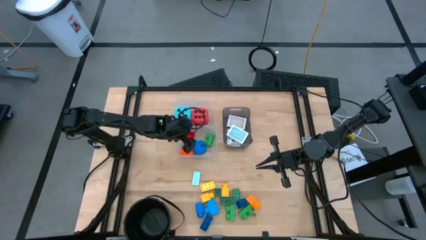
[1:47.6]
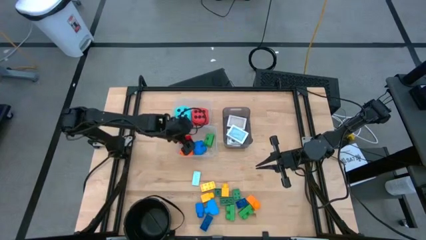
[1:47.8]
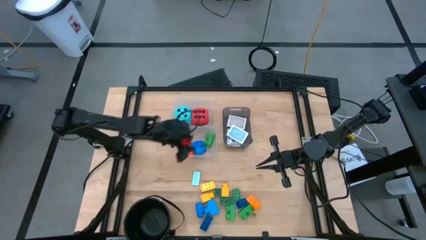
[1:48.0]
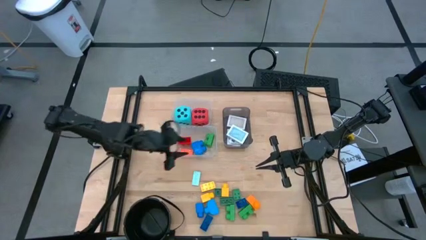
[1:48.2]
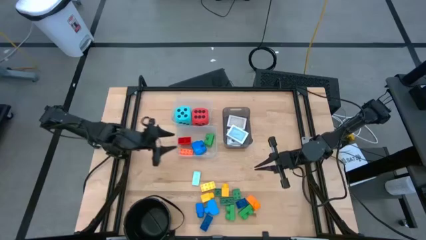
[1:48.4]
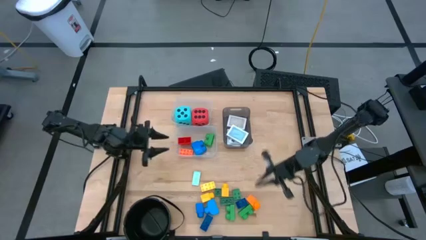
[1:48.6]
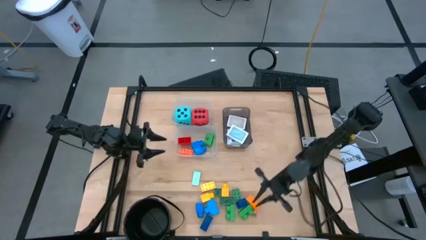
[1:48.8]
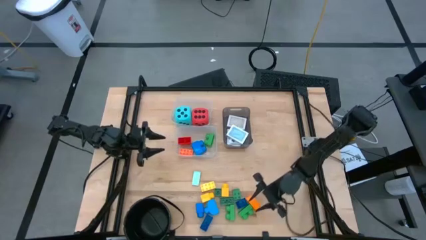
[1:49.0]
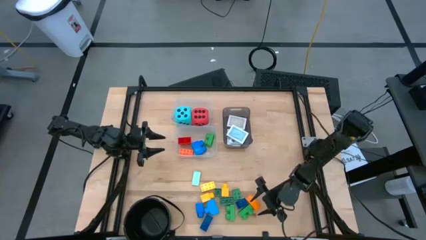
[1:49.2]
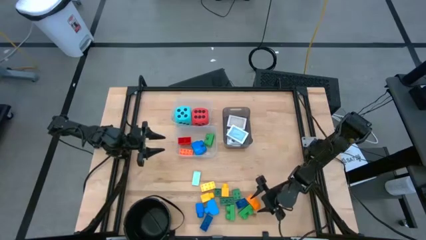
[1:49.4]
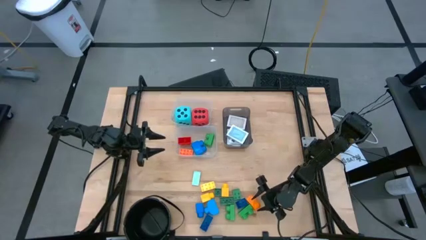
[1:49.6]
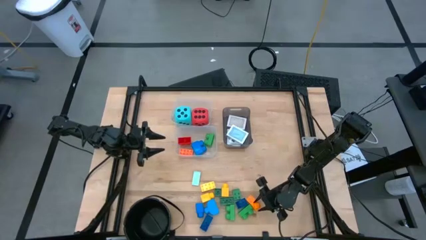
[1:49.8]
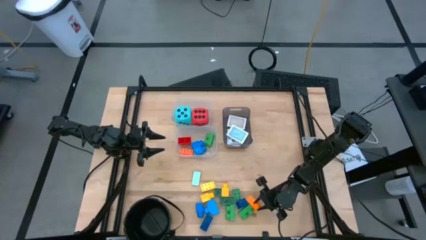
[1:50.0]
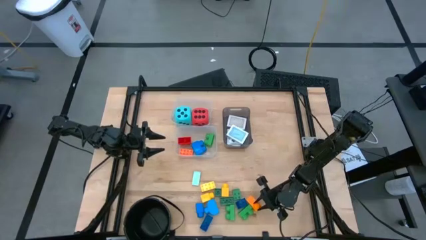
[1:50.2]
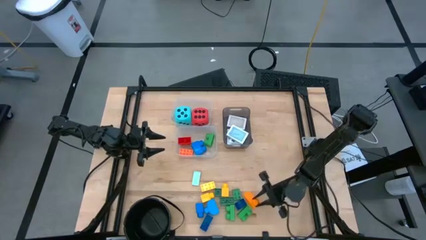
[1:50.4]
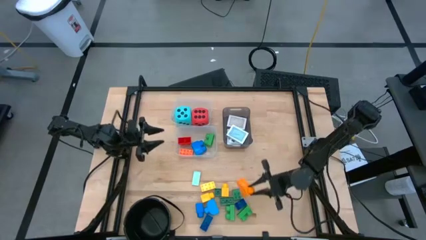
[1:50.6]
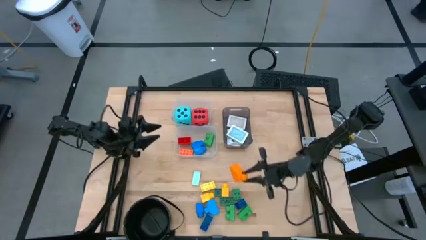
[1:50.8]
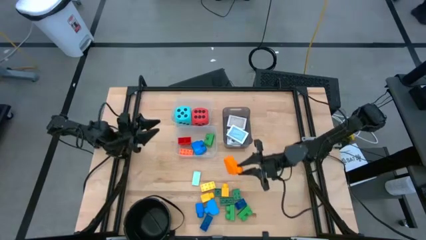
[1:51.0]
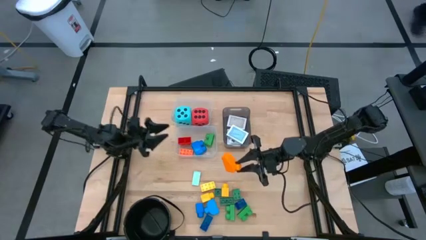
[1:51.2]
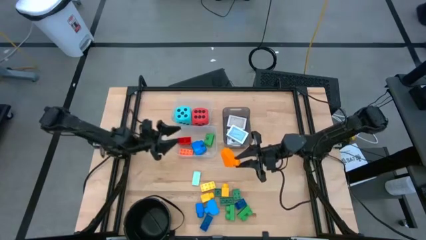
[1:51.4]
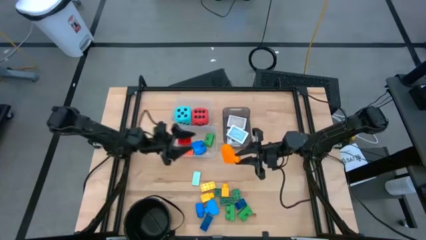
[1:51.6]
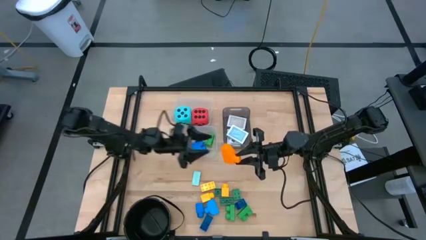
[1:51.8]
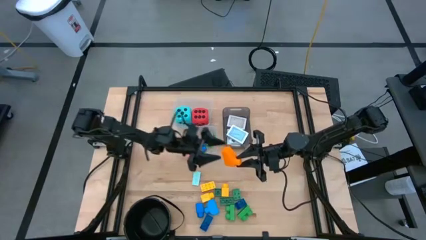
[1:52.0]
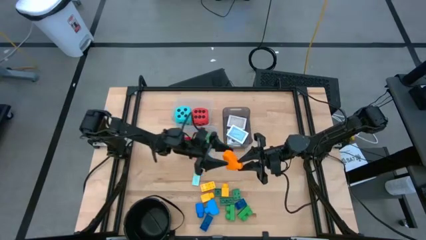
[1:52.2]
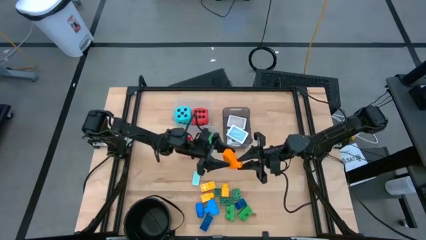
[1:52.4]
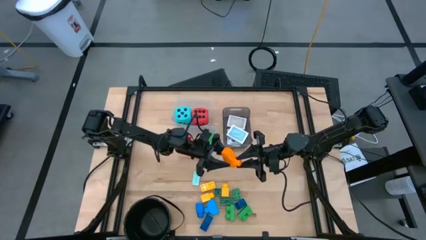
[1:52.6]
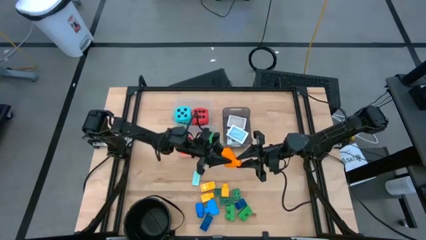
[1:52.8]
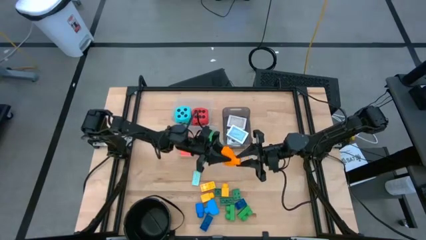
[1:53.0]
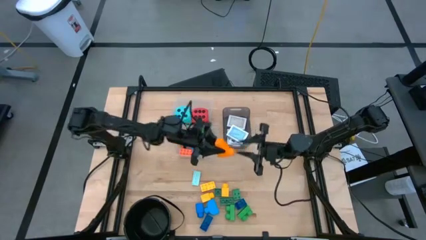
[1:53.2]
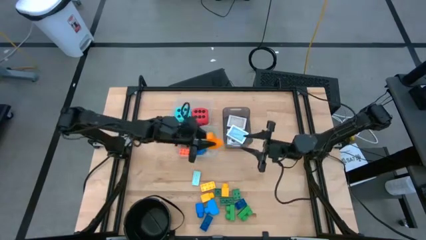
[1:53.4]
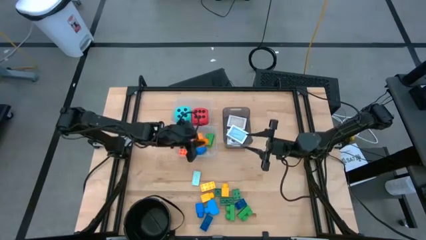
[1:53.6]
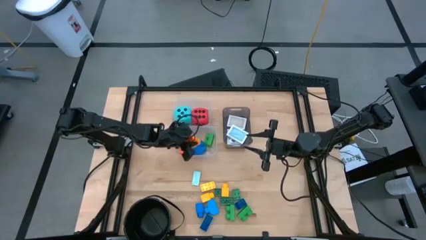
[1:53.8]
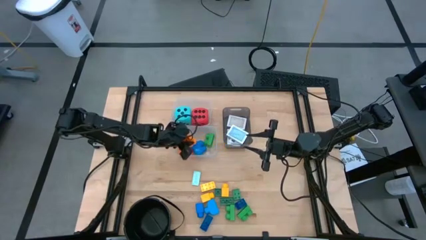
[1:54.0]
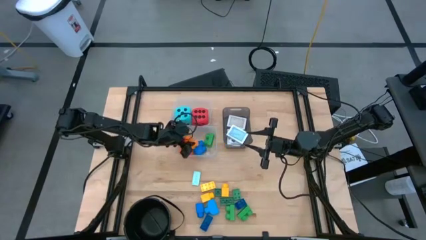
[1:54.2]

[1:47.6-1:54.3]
Task: Pick & Place Toys
Put the orange game piece into the bottom transparent bin

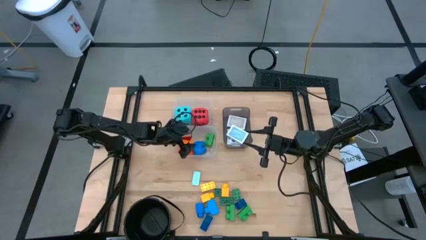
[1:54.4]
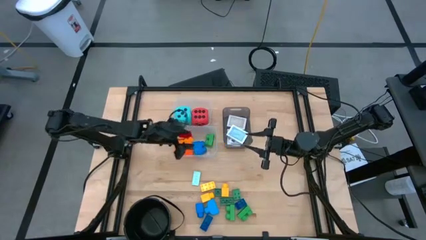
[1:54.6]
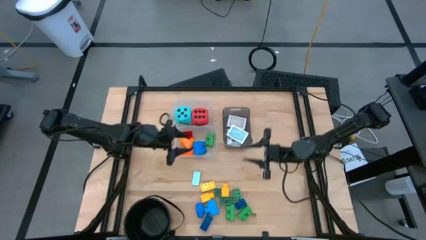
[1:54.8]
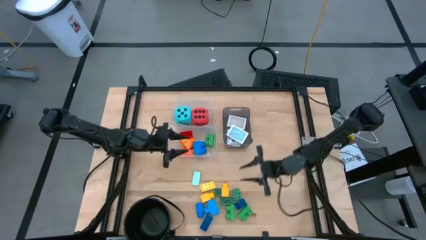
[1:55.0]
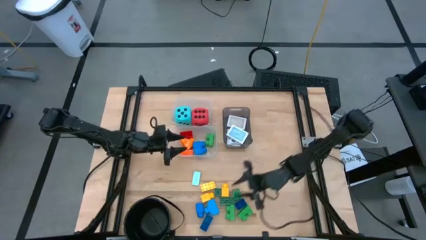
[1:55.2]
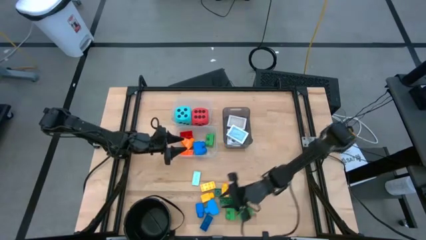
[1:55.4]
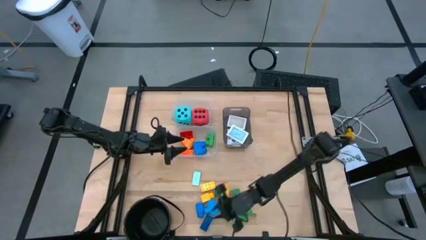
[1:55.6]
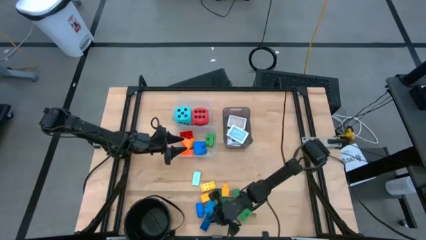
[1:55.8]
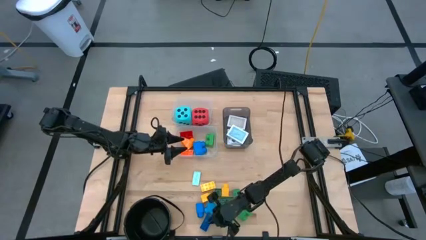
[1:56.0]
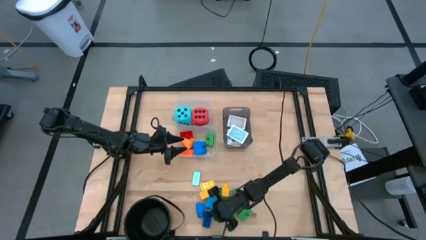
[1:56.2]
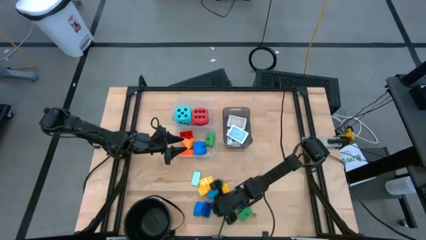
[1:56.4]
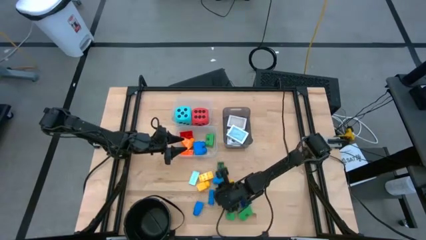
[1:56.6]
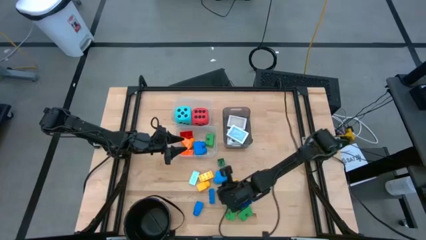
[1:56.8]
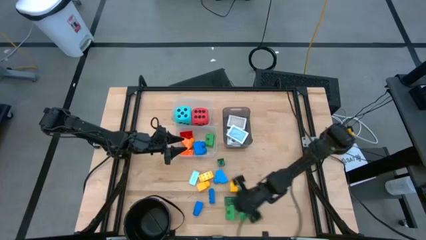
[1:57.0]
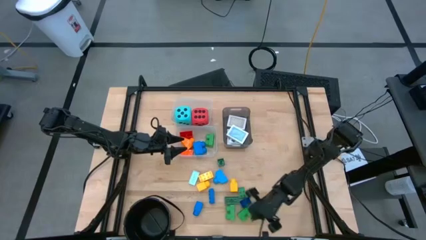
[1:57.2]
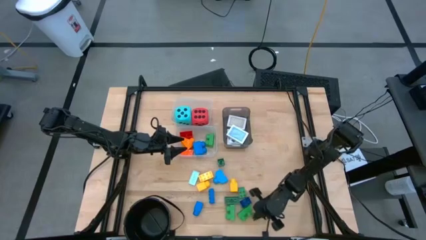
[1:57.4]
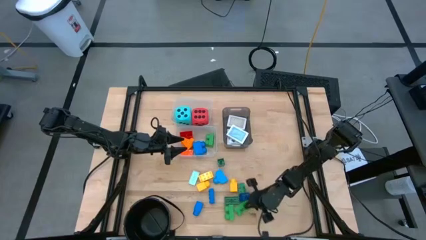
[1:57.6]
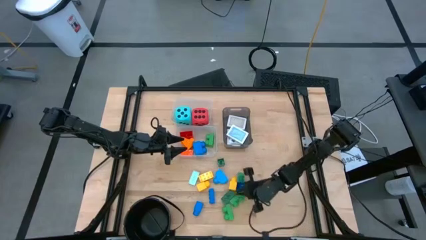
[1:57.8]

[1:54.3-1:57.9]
Adjust the game pieces on the table

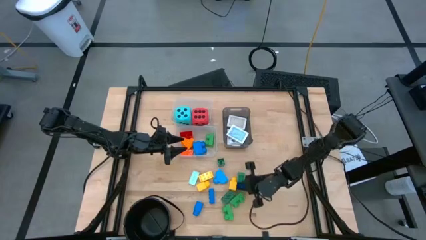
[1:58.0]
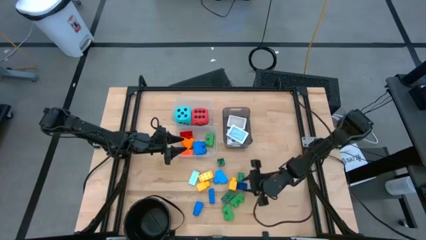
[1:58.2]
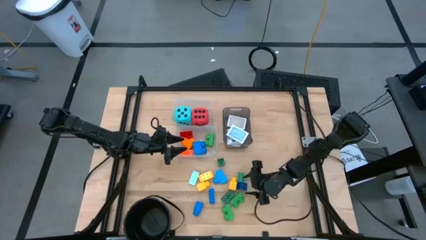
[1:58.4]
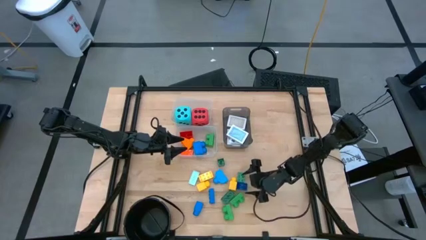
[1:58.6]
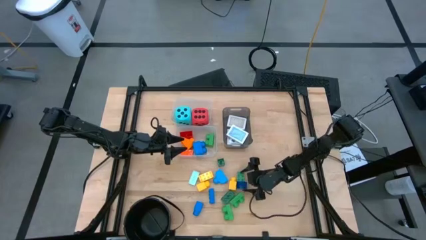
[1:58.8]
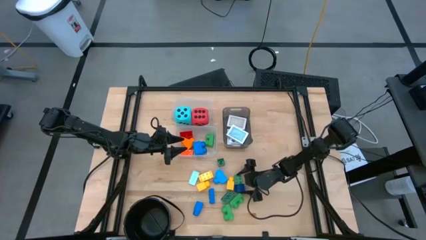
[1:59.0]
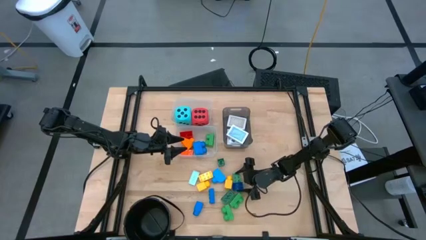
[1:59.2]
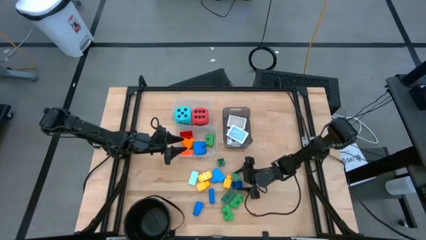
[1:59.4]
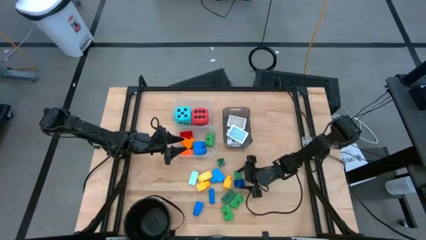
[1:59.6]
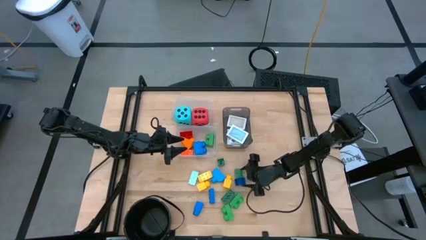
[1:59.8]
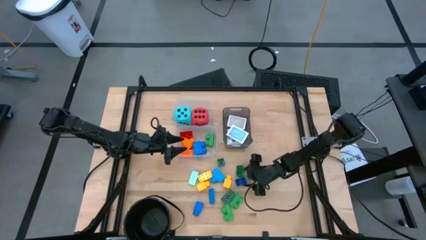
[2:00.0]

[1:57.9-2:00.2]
Put the blue game piece into the bottom transparent bin

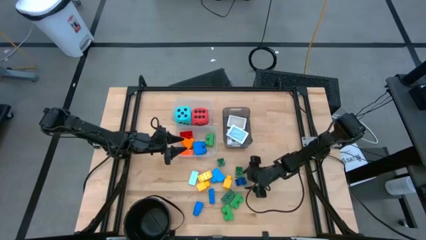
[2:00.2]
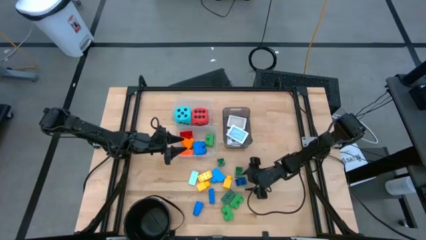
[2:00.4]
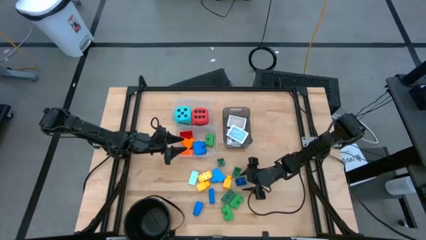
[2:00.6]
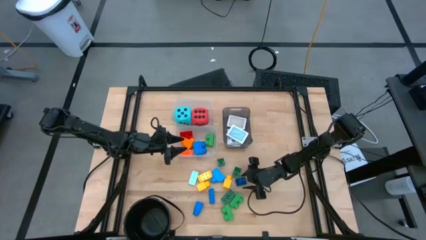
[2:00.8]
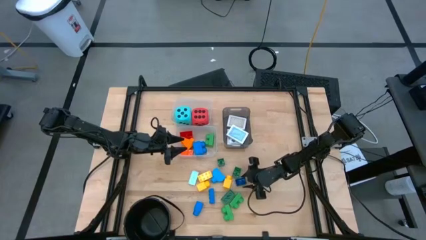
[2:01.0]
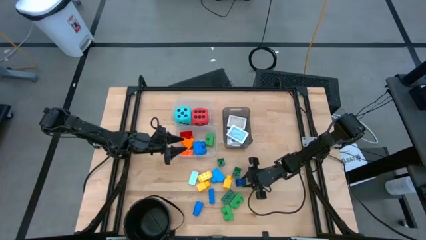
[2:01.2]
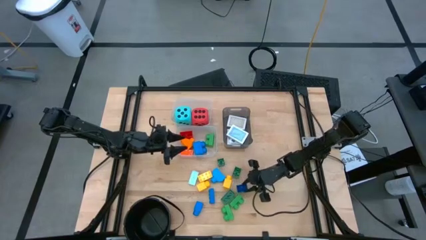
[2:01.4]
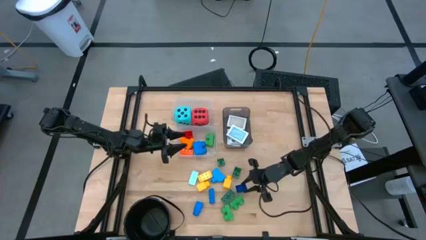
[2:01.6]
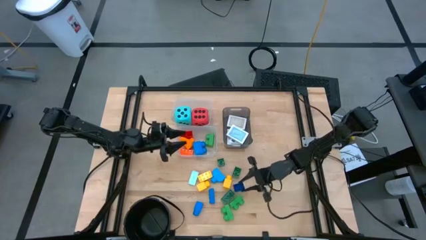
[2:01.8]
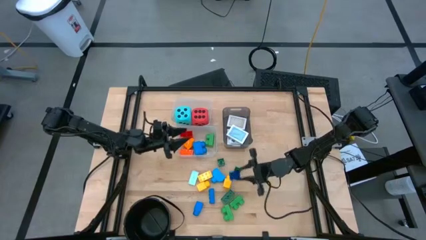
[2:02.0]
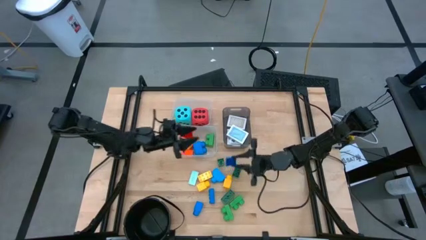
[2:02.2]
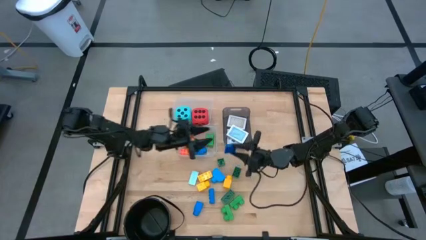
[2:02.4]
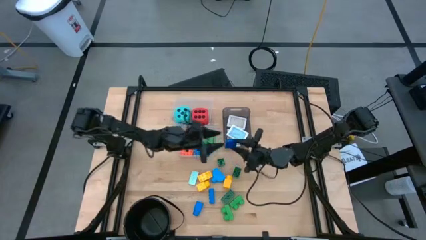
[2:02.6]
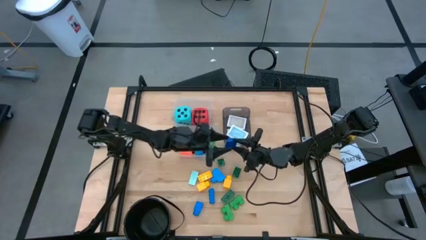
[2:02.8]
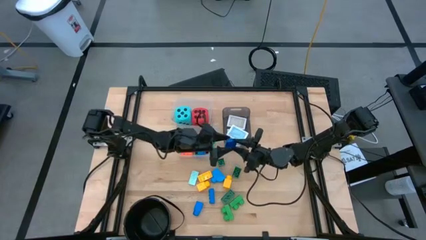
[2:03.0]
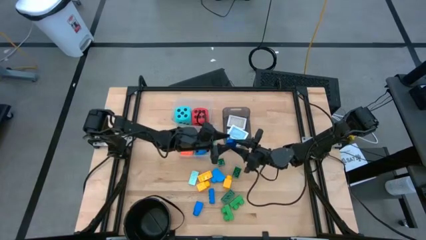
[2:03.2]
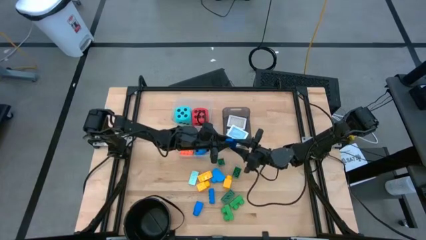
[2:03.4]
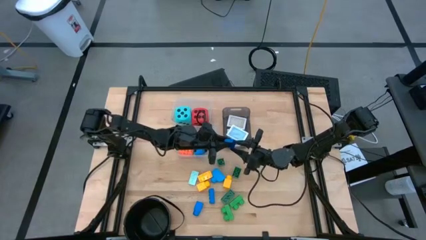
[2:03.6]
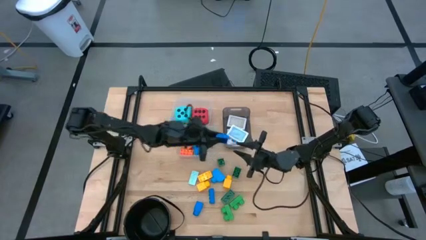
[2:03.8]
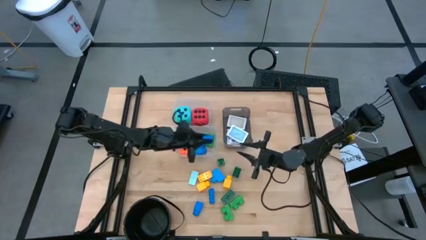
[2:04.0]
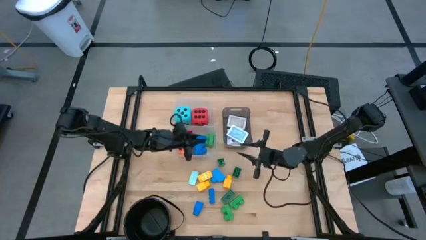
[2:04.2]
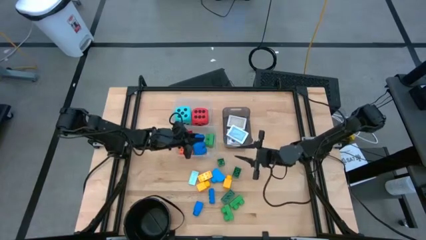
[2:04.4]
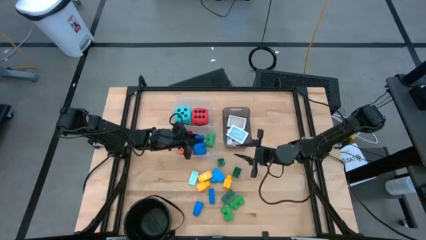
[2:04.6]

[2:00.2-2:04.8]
Put the blue game piece into the bottom transparent bin
